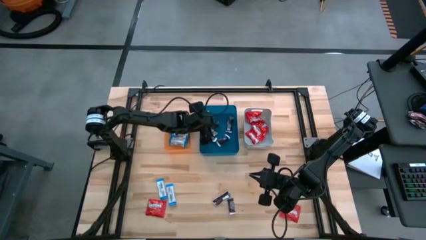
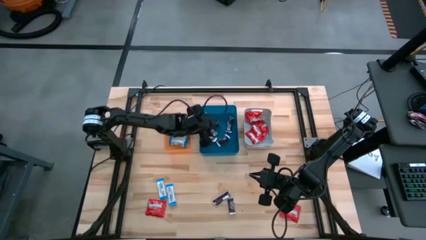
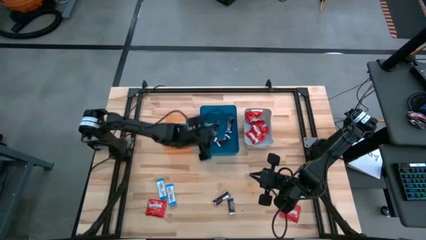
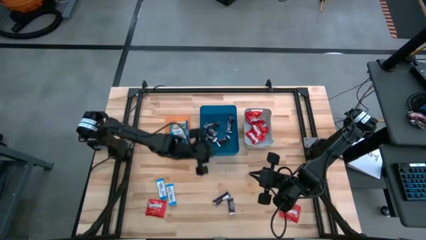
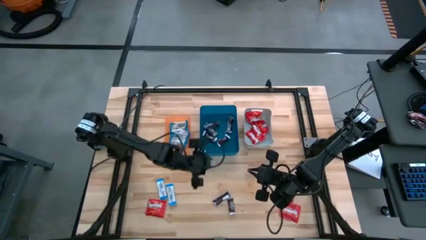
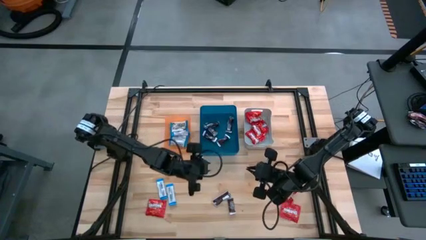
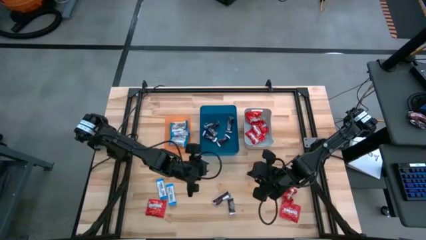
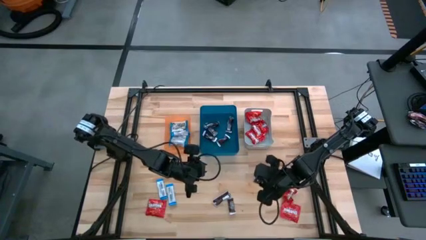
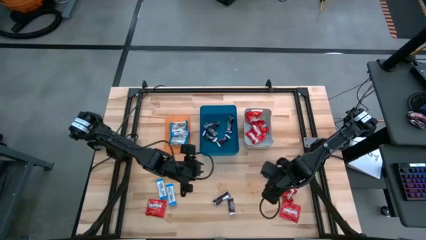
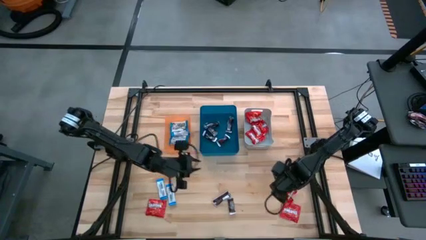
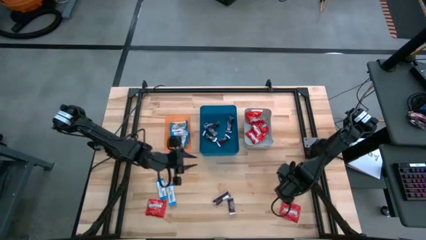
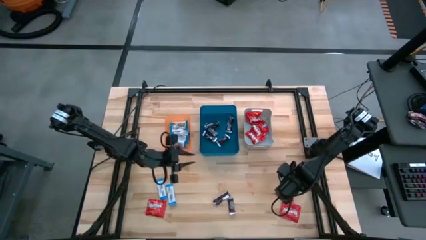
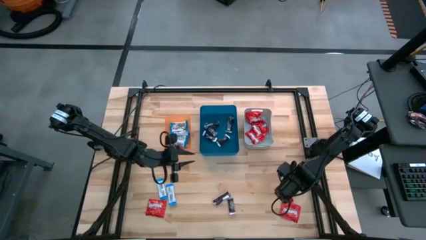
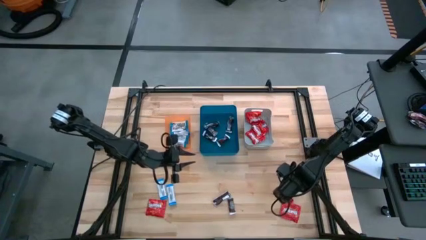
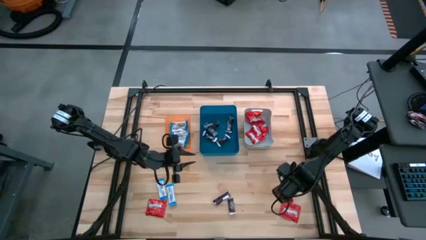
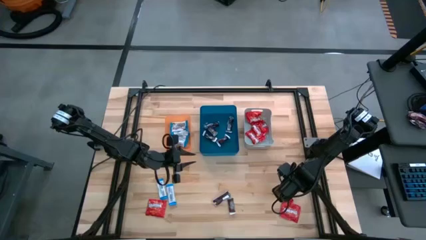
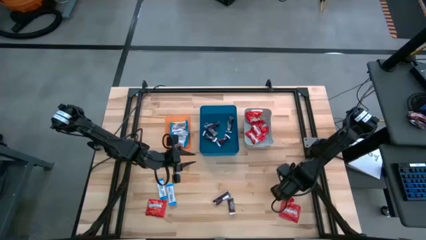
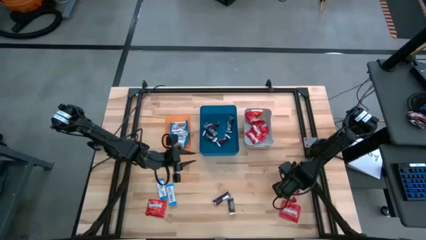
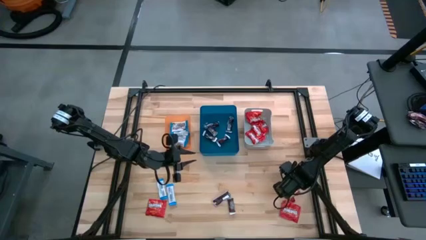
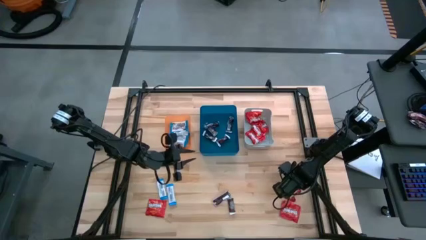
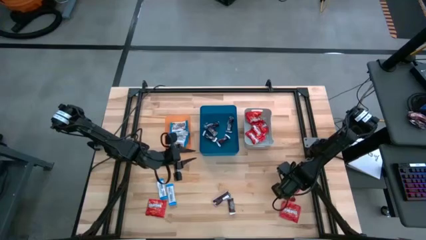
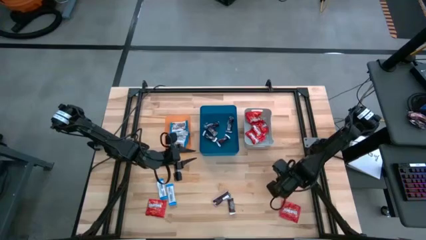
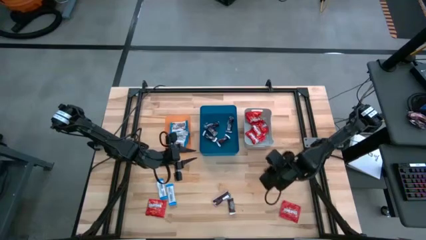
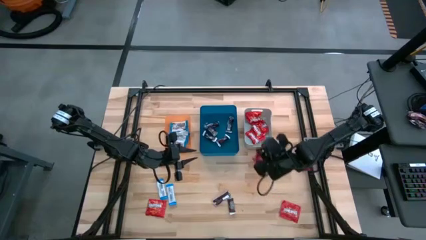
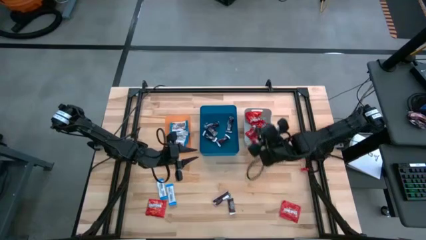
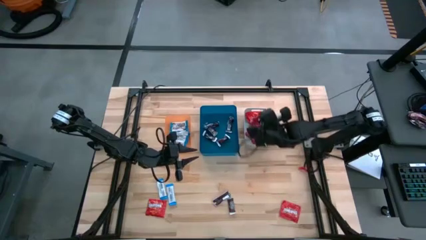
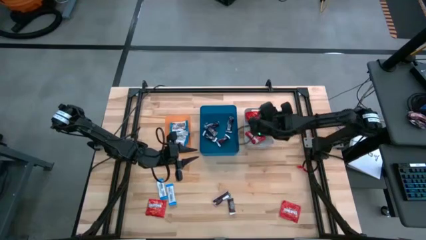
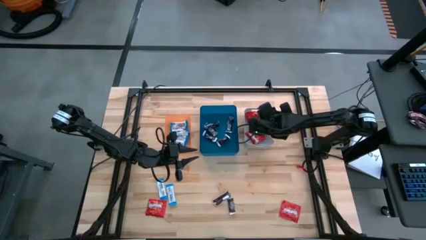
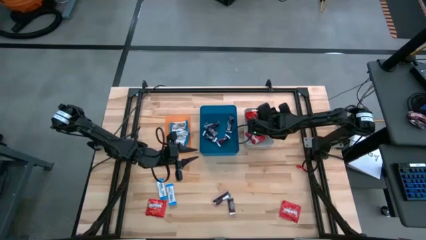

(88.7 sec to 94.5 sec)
Task: Sort candy
Put the red candy into the gray bin

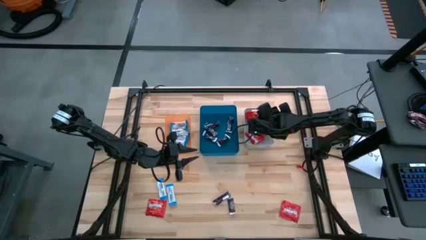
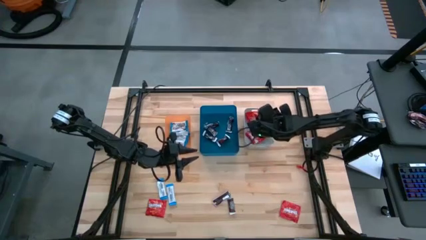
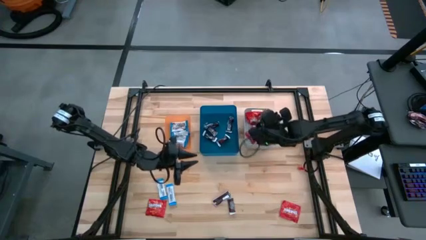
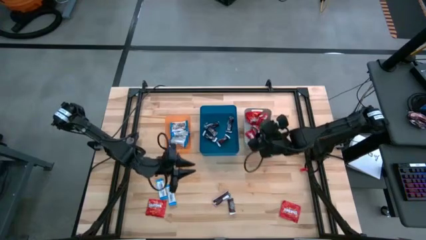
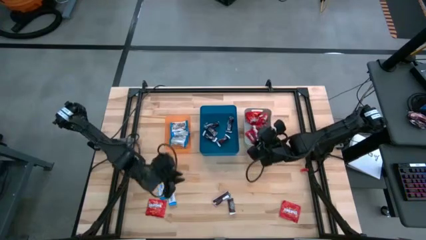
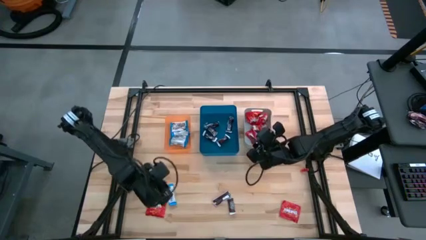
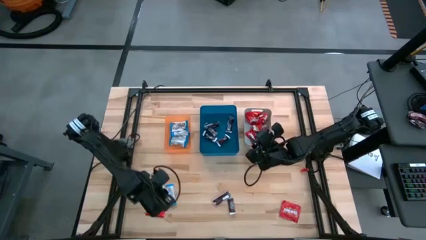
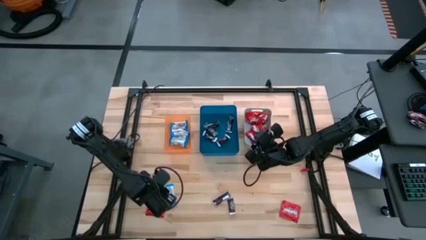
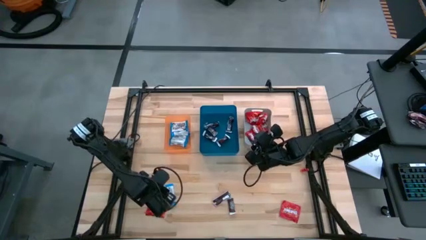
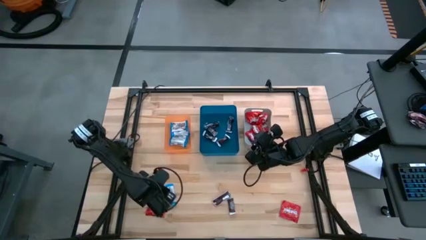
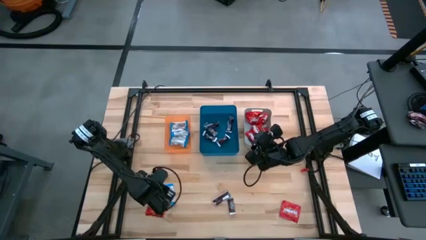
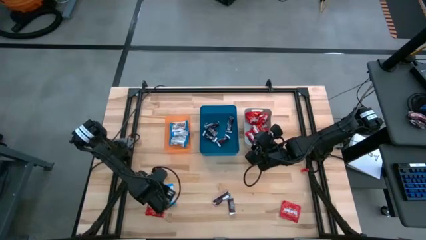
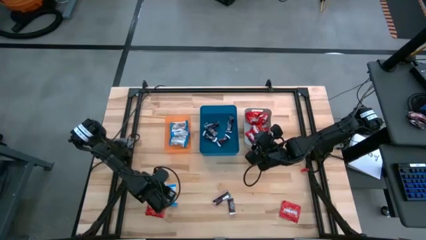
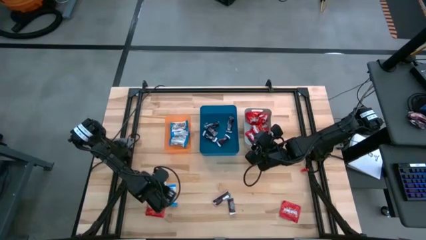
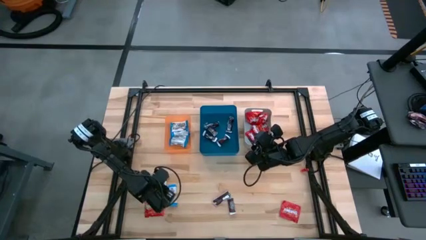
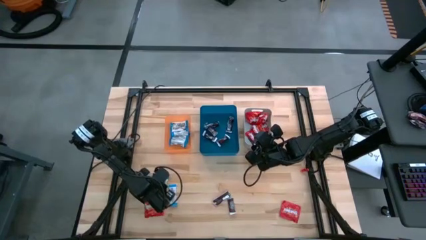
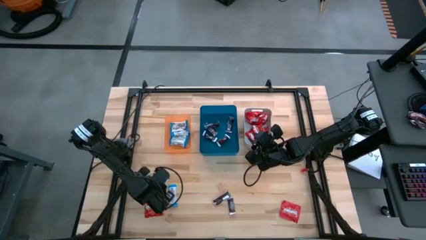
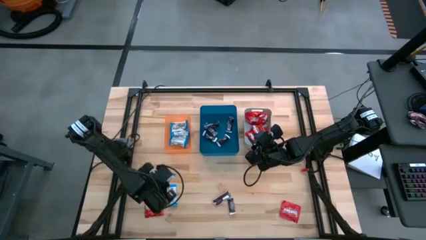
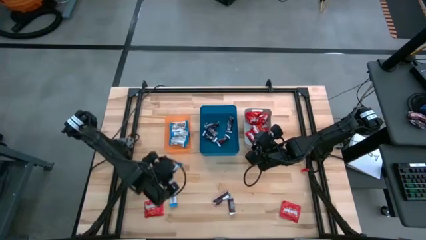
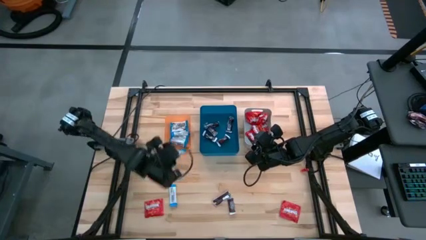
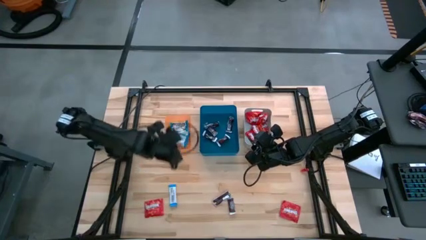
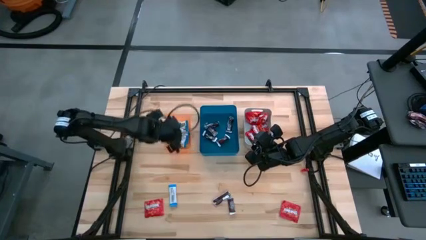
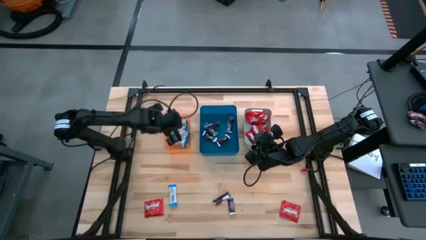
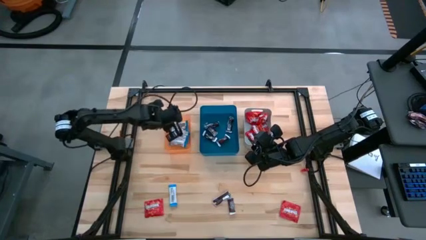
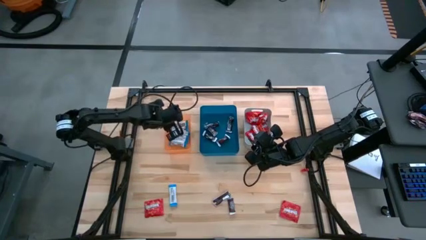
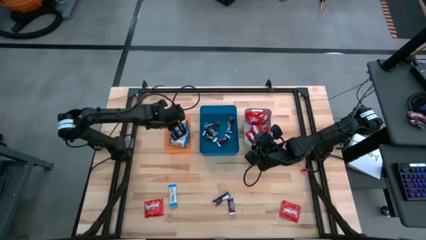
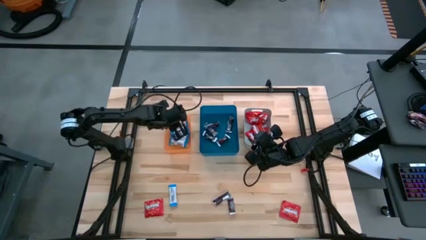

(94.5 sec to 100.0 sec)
Put the white chocolate bar into the orange bin

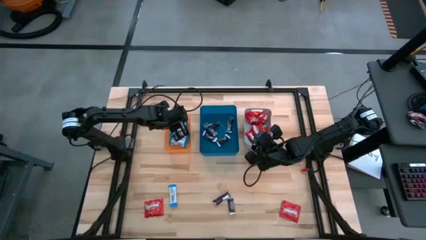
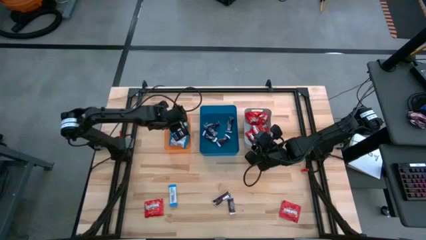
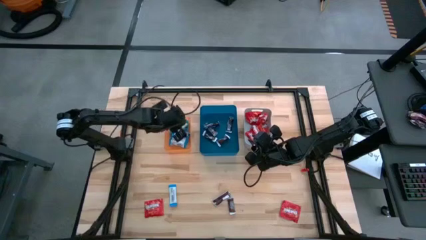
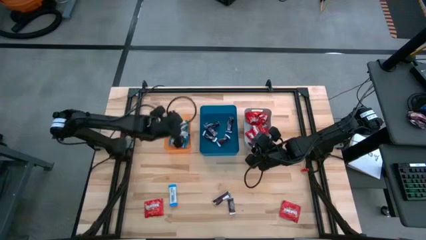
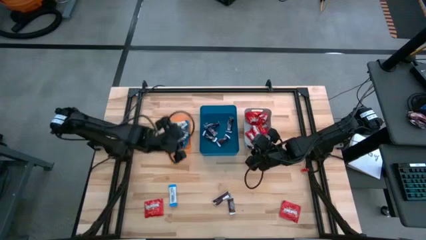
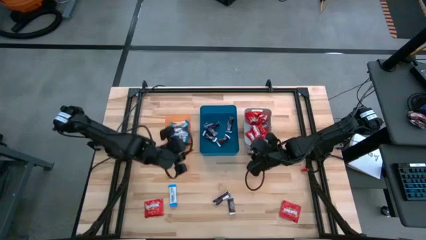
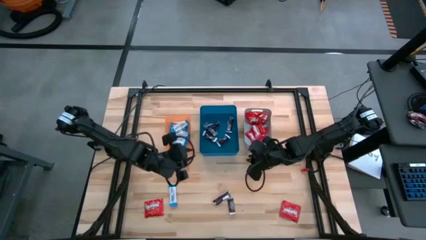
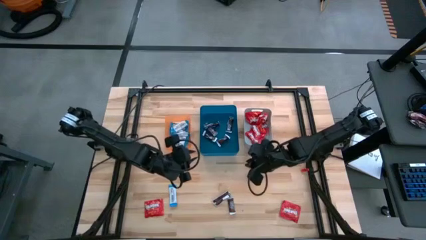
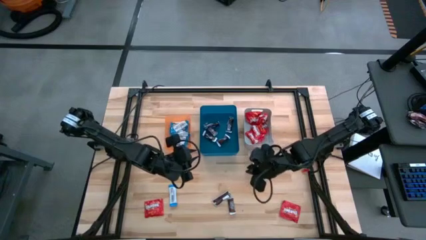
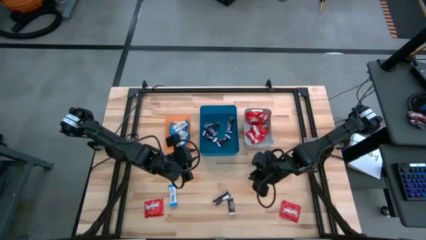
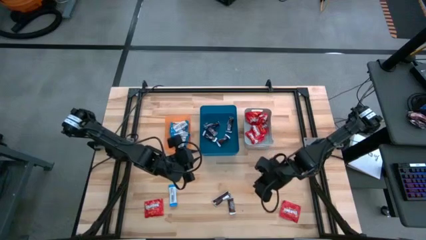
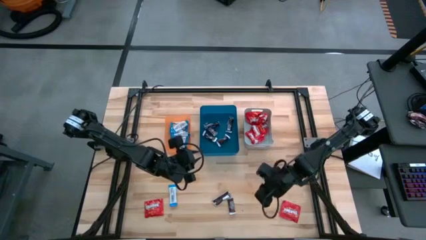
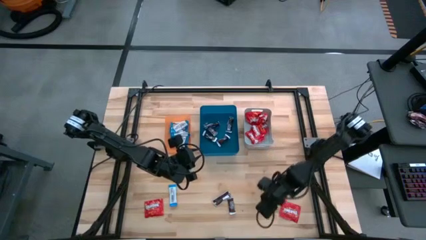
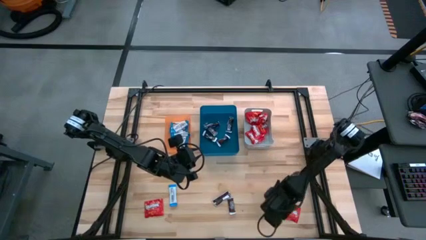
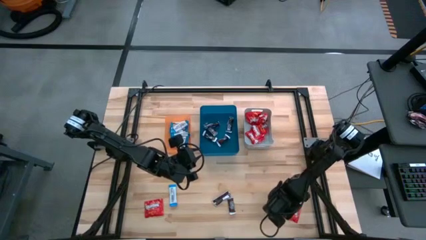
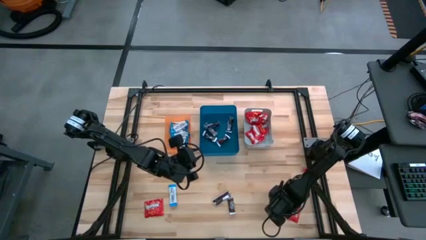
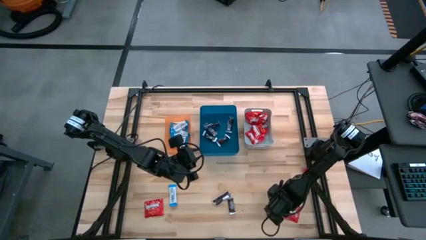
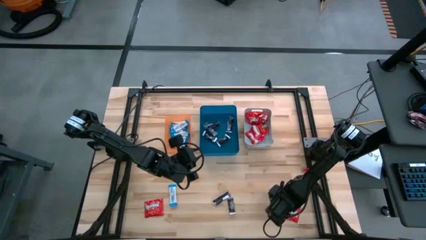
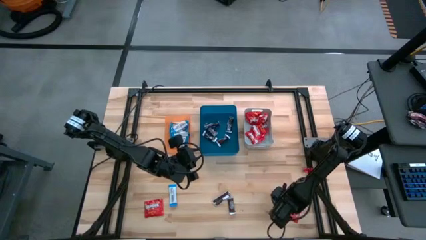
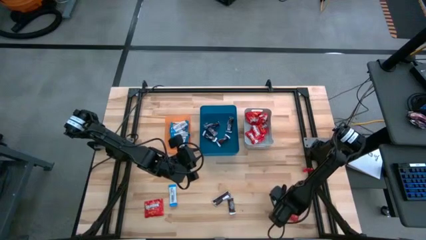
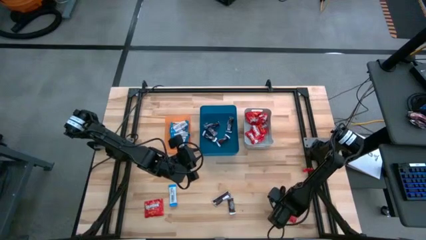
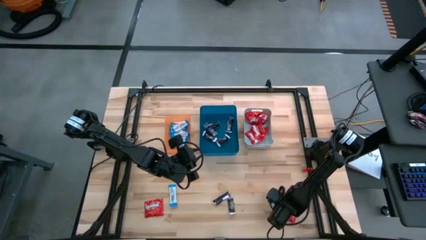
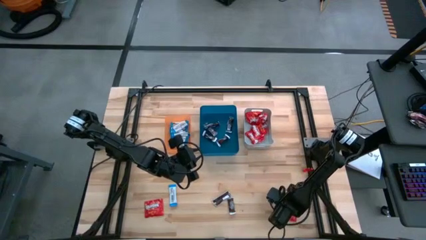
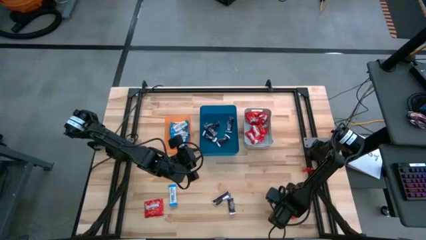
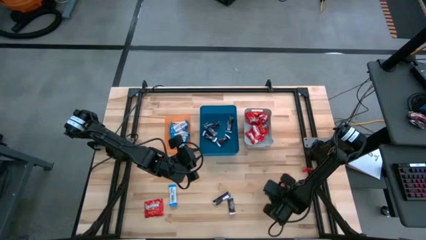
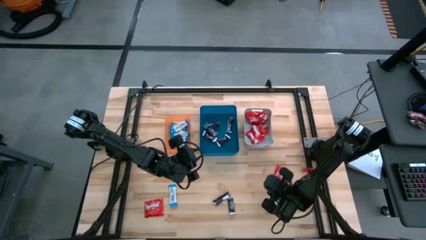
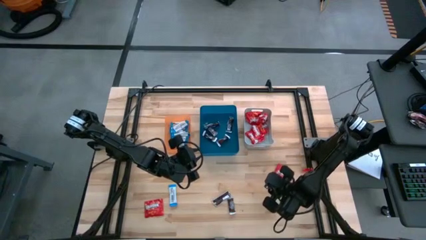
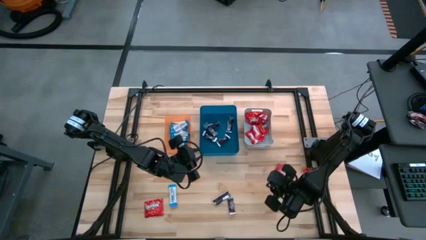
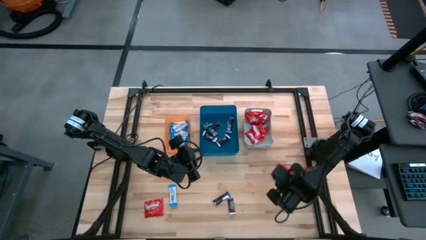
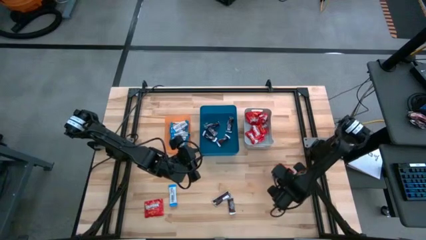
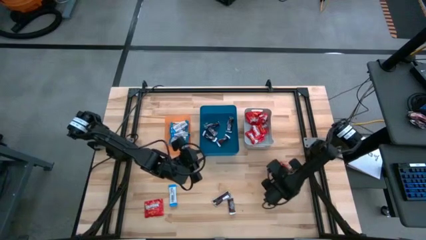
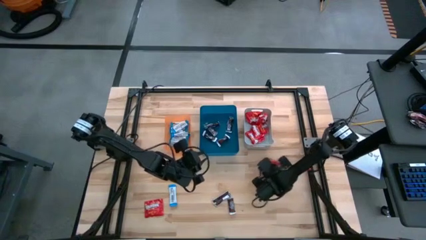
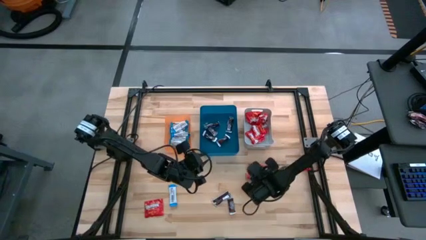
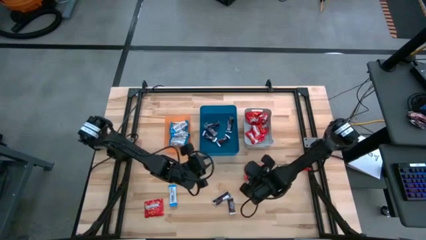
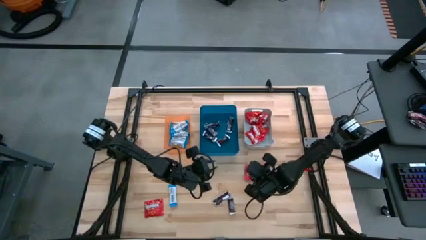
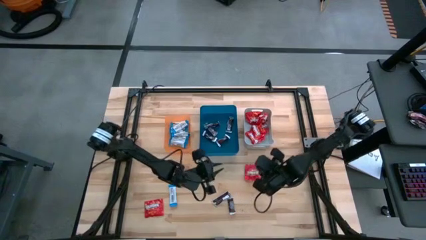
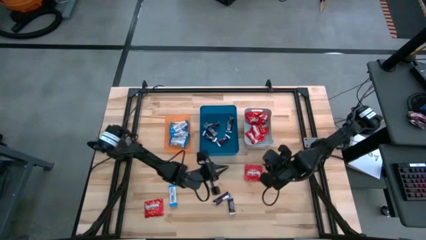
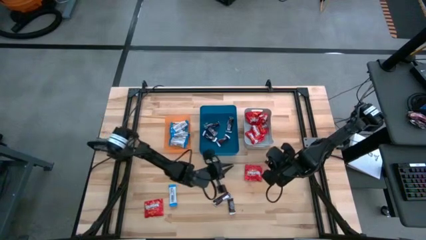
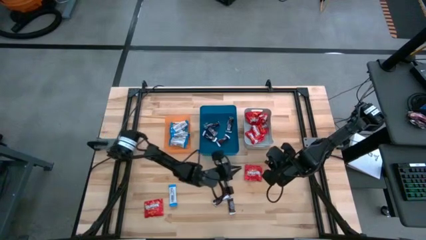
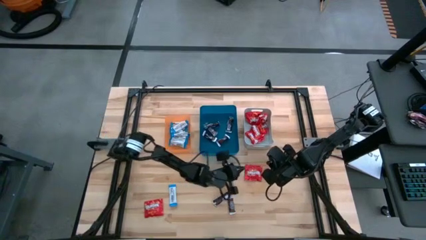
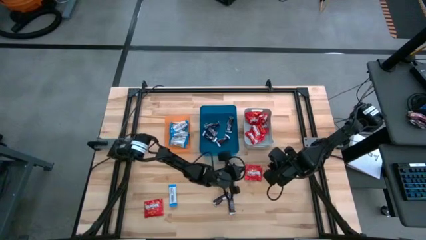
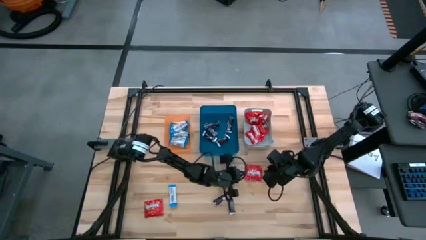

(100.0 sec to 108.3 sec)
Put the red candy into the gray bin
